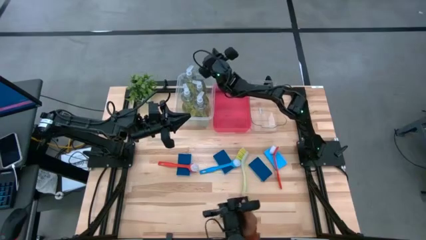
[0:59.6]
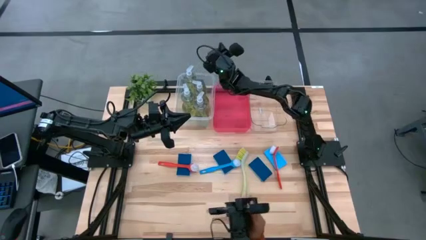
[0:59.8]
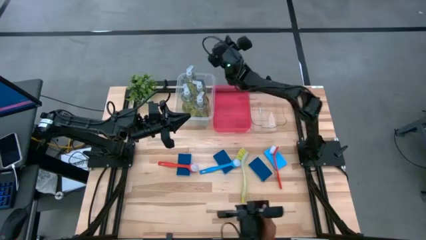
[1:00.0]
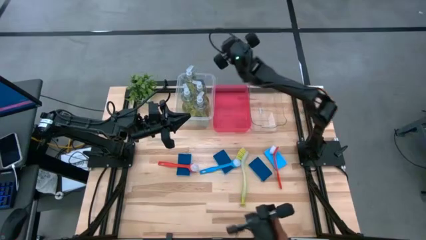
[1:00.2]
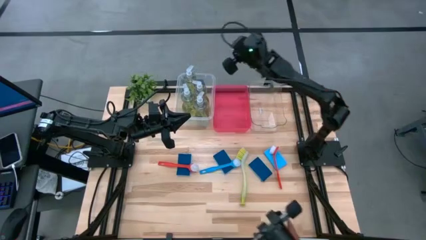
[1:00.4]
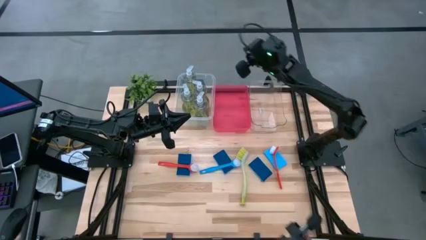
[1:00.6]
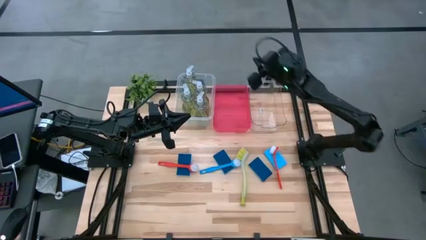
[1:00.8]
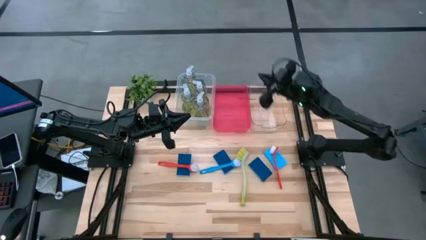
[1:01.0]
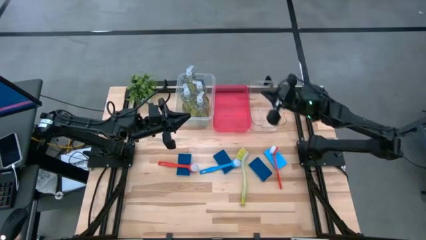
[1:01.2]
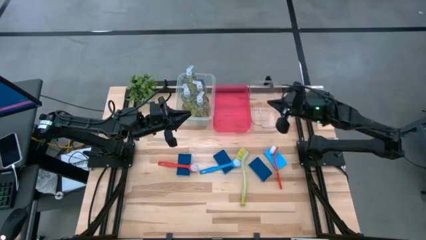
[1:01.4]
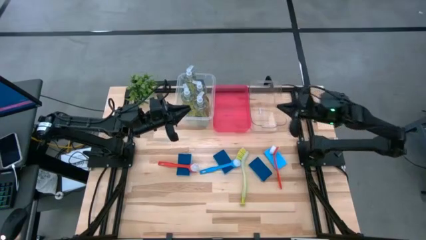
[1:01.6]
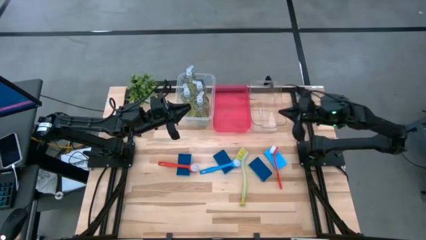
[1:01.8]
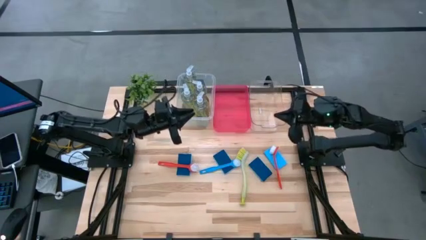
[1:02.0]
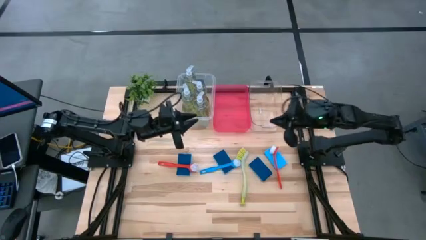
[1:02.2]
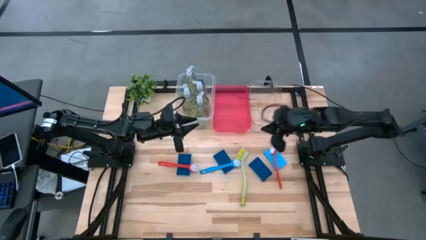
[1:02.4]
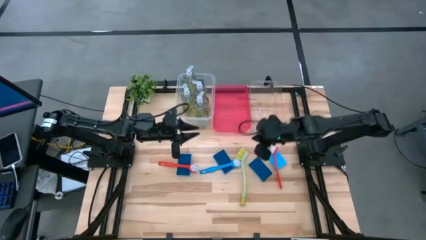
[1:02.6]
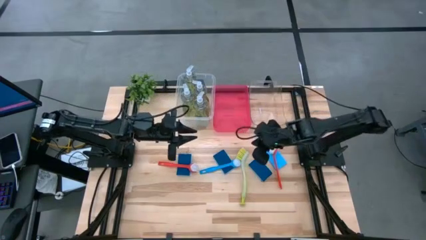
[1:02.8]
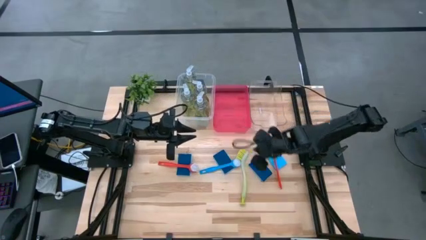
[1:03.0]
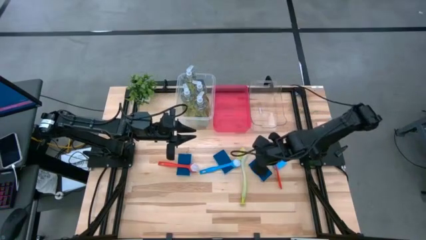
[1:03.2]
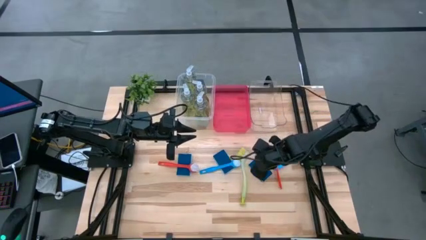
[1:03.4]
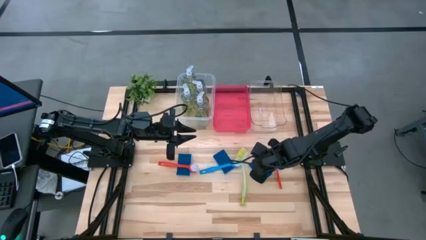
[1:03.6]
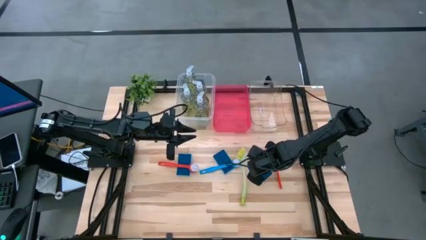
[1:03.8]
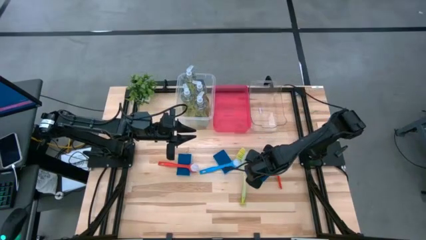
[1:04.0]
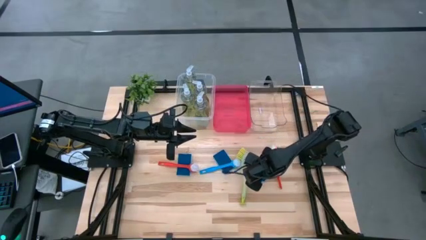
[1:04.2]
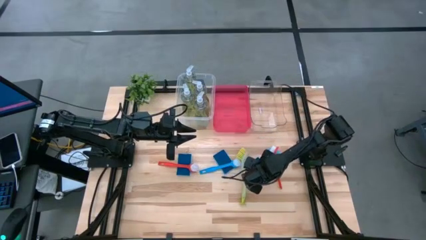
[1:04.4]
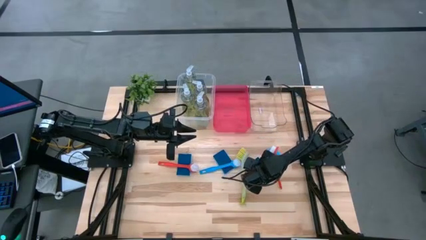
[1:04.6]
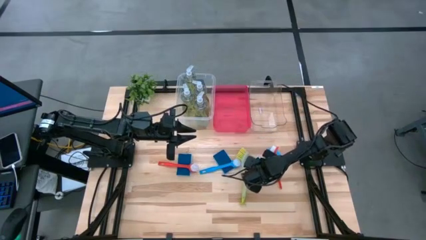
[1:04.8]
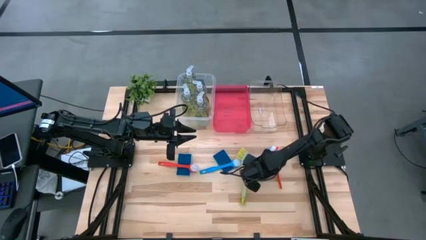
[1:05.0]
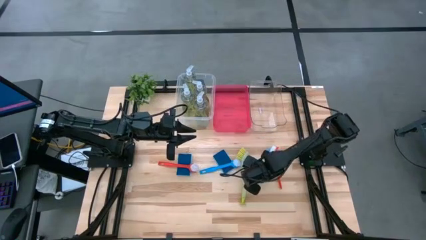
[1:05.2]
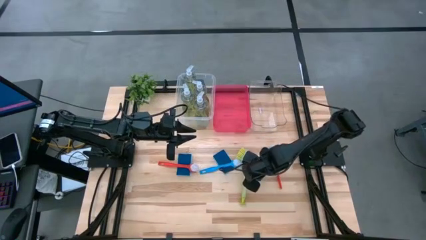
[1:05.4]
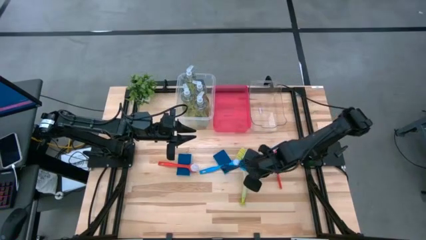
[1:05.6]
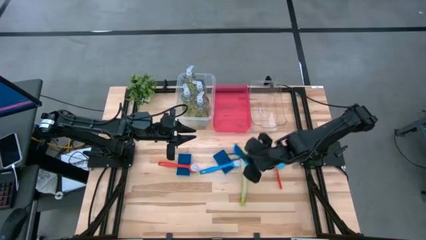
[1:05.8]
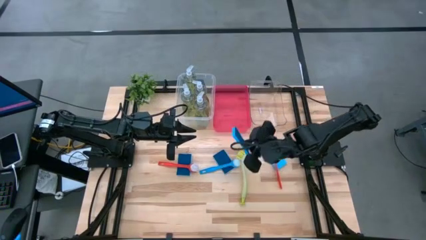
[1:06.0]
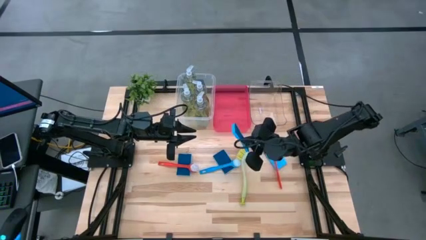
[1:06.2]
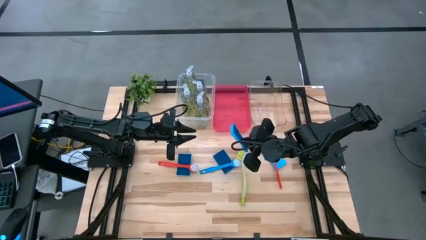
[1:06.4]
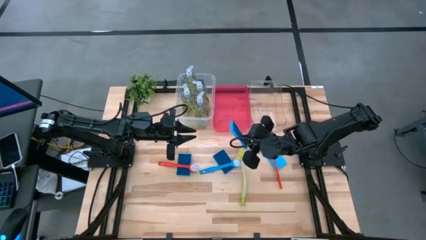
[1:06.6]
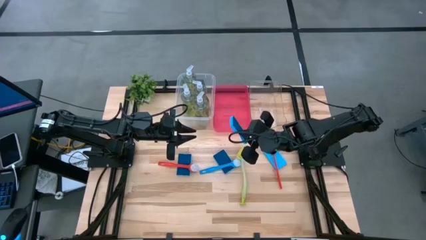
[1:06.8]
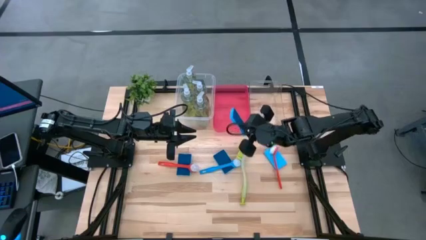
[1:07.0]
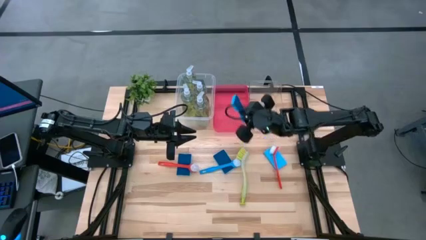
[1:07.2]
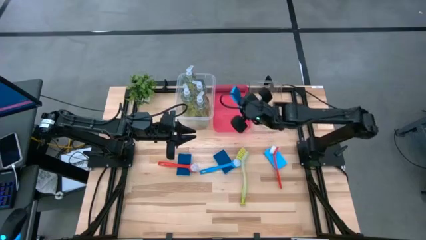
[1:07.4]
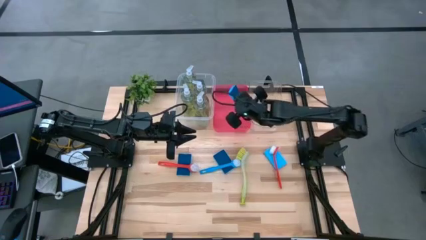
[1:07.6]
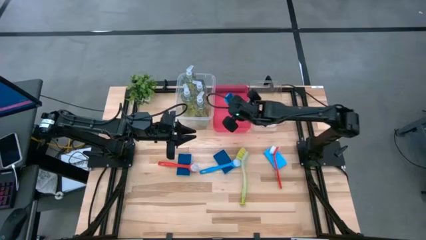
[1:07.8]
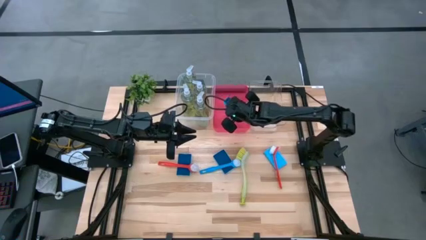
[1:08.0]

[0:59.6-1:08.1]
Task: Pick & Place Kitchen Sink Supplies
Put the blue sponge into the red bin

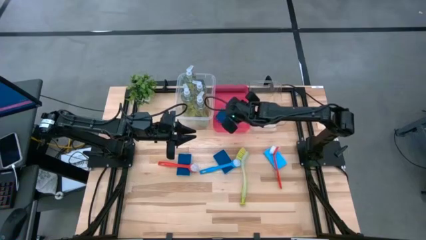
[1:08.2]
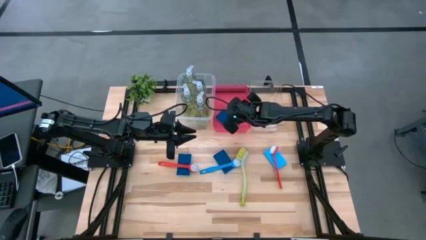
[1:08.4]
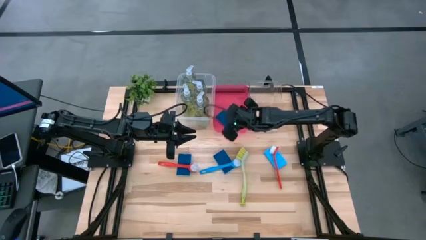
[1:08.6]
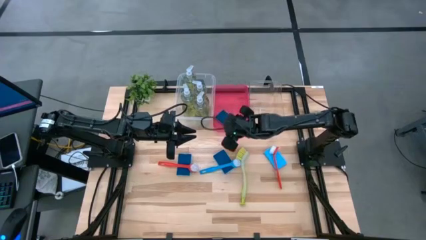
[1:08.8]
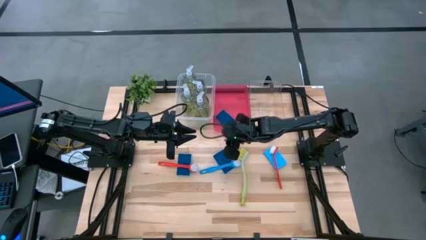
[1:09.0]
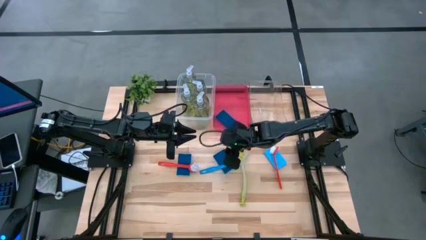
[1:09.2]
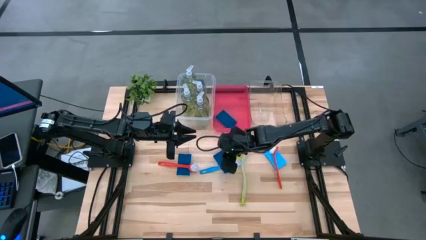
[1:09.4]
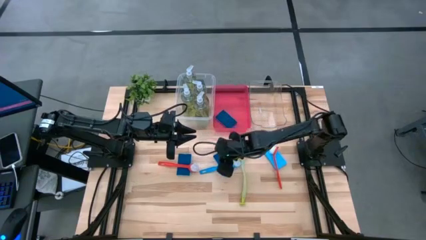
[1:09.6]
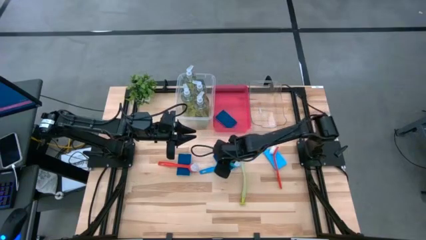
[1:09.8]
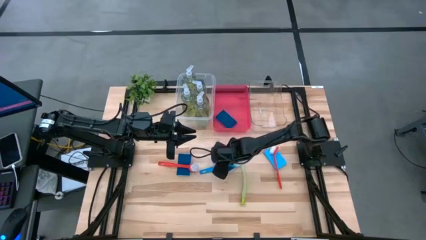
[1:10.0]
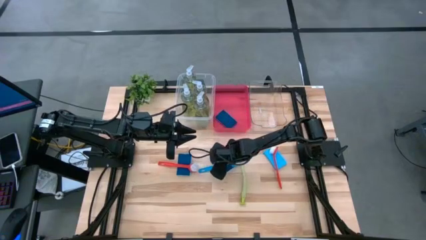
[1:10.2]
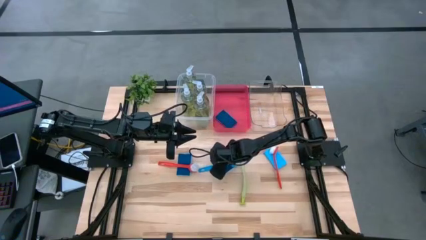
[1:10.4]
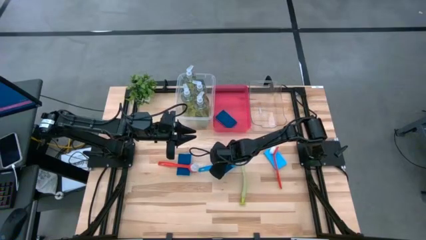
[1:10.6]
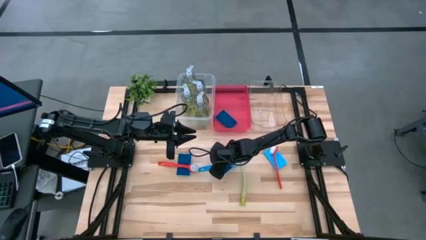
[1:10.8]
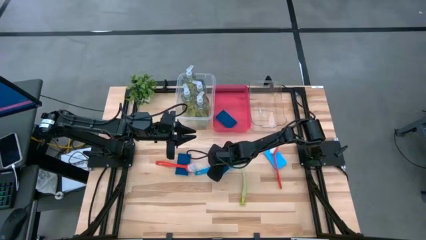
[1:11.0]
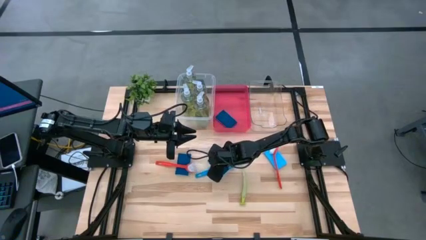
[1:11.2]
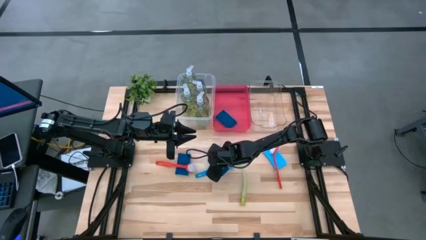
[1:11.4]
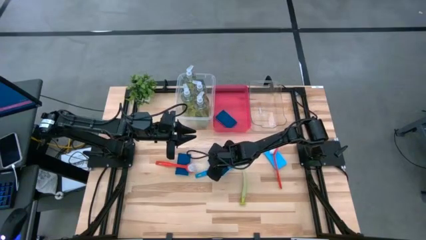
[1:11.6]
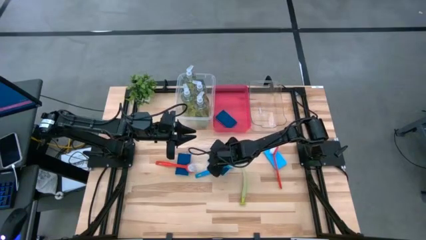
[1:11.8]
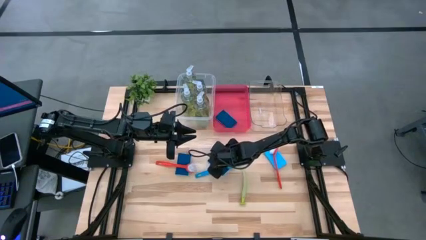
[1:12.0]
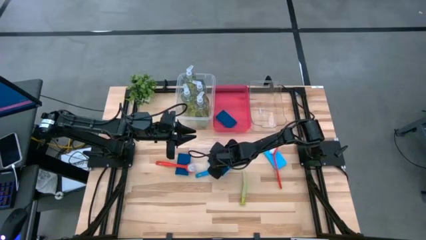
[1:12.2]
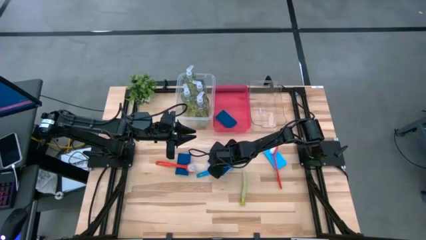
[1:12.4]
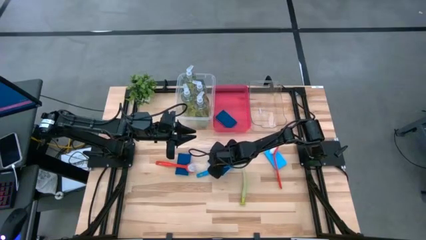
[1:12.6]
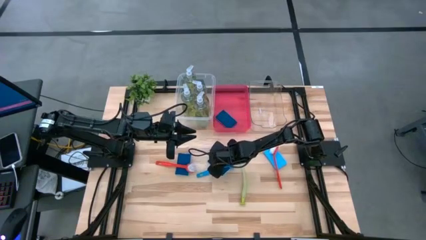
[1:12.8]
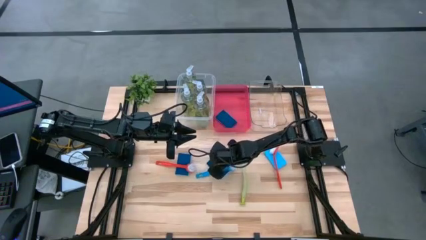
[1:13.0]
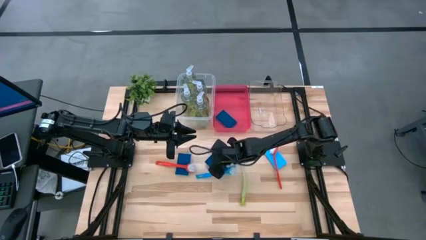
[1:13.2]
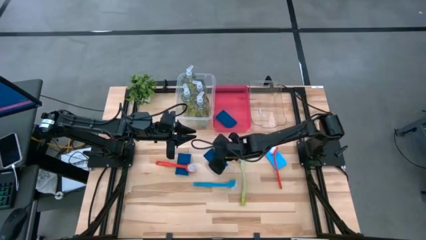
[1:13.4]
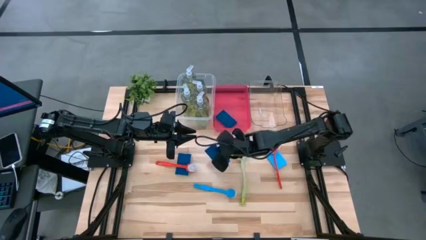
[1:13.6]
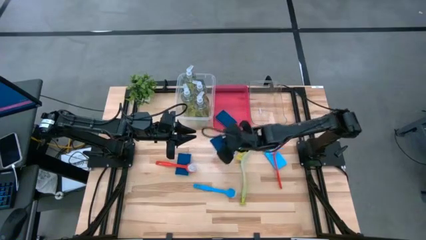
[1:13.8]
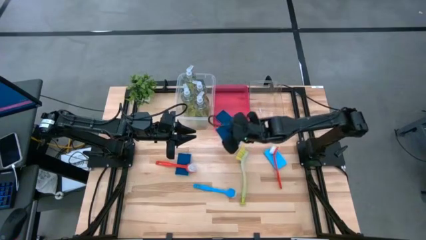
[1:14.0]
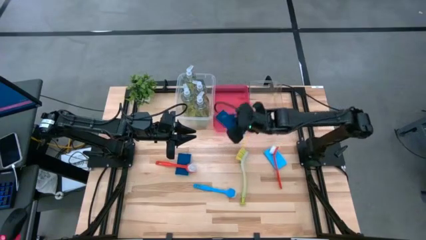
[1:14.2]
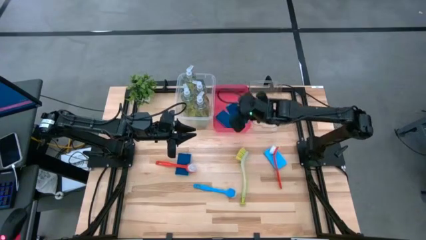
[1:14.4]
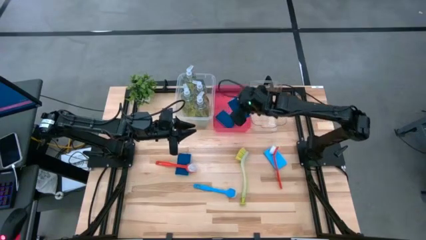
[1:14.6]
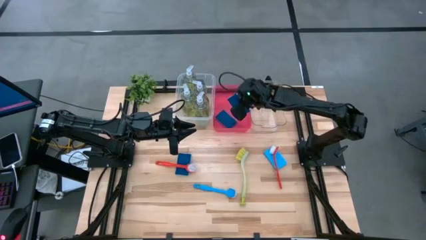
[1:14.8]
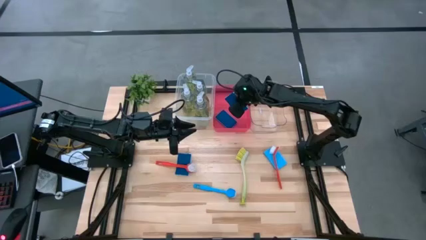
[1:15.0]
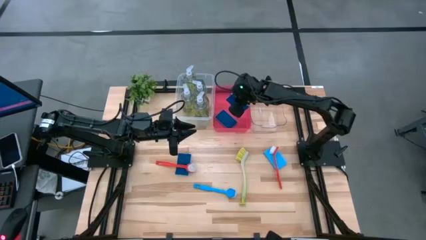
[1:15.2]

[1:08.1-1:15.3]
Put the blue sponge into the red bin

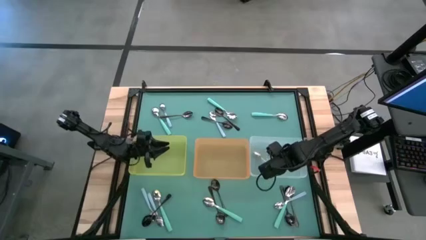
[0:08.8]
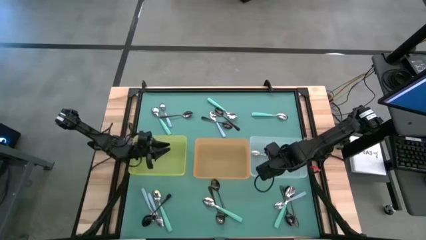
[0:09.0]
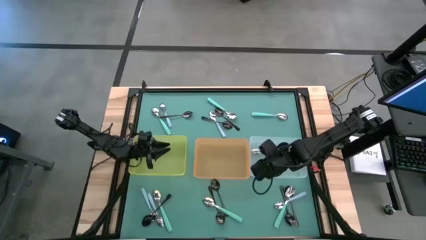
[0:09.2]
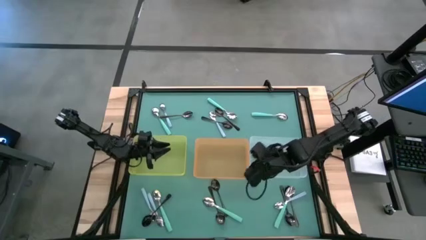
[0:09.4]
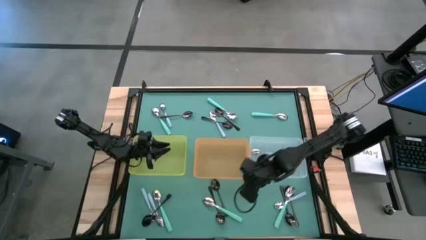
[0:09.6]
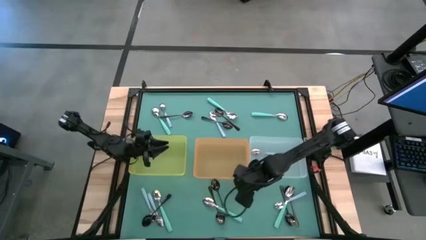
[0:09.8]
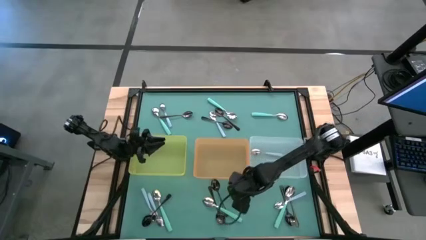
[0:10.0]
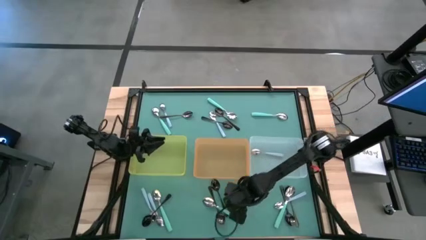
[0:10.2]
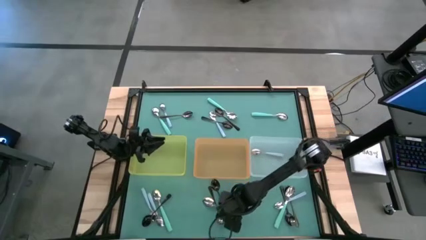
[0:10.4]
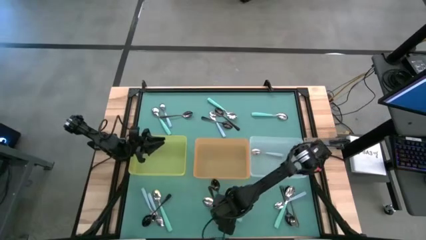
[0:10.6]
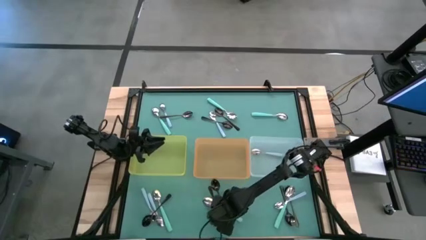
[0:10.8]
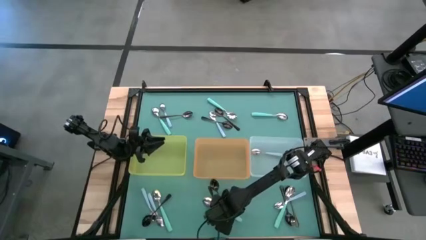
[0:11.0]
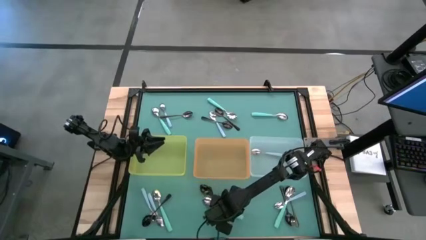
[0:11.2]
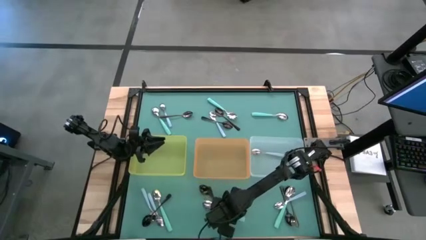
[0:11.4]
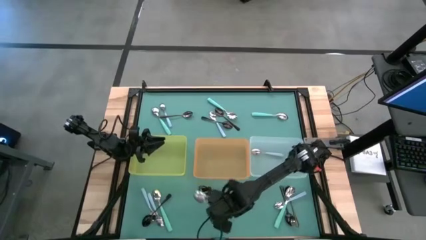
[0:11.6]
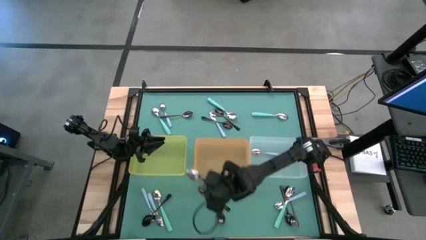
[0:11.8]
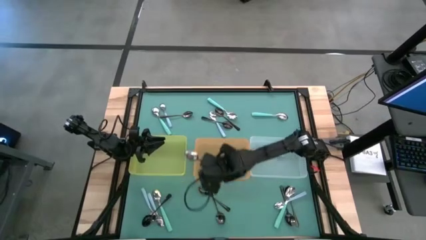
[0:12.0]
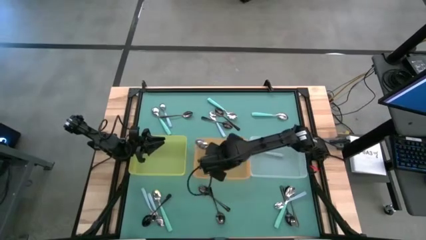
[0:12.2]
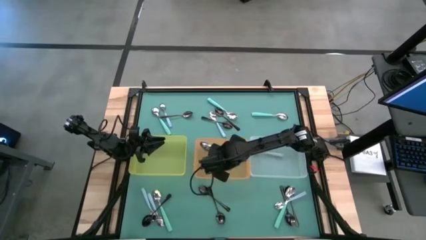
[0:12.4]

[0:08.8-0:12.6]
Task: Sort silverware by color (type)
Put the green spoon into the orange bin
